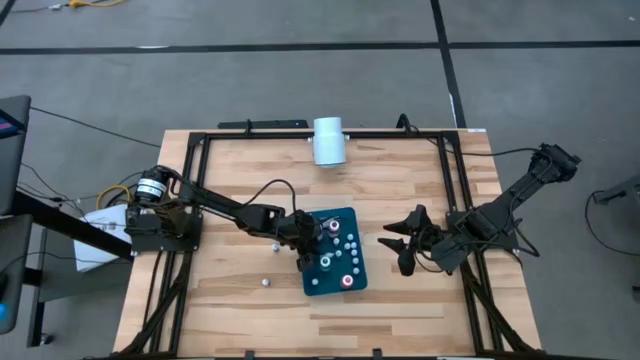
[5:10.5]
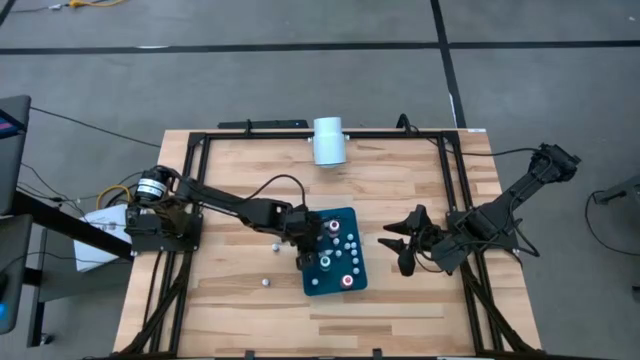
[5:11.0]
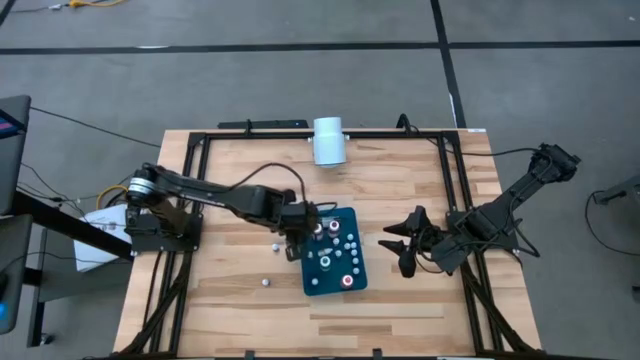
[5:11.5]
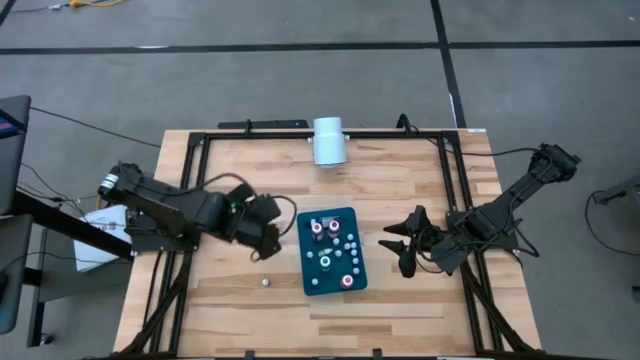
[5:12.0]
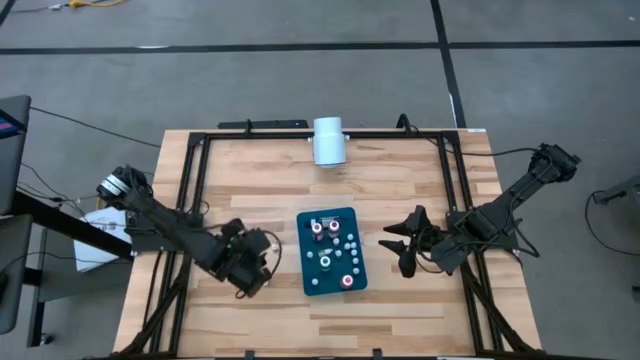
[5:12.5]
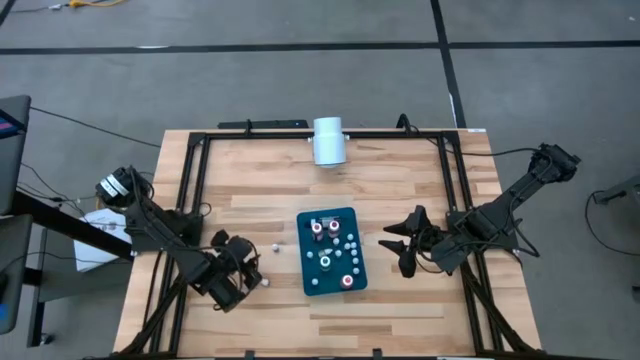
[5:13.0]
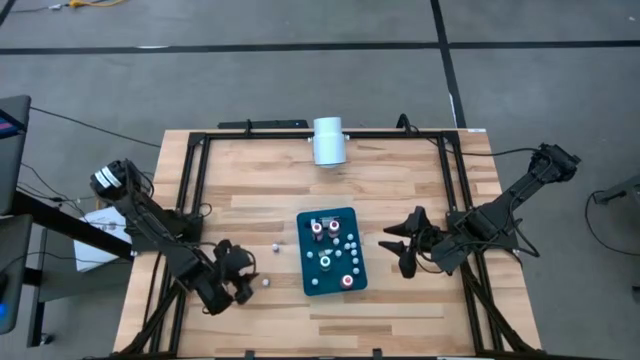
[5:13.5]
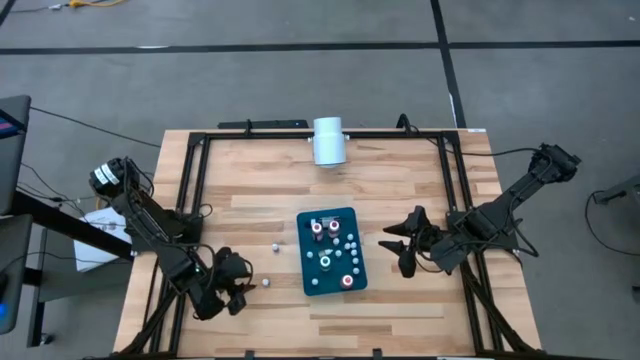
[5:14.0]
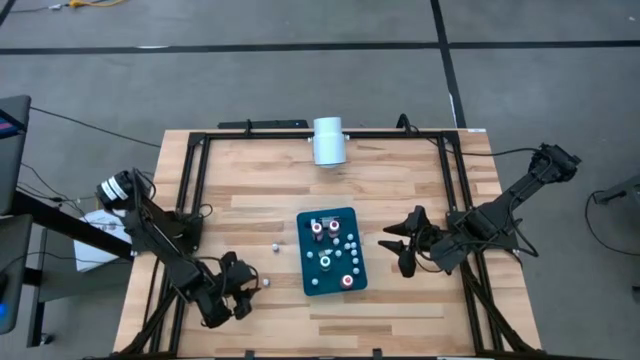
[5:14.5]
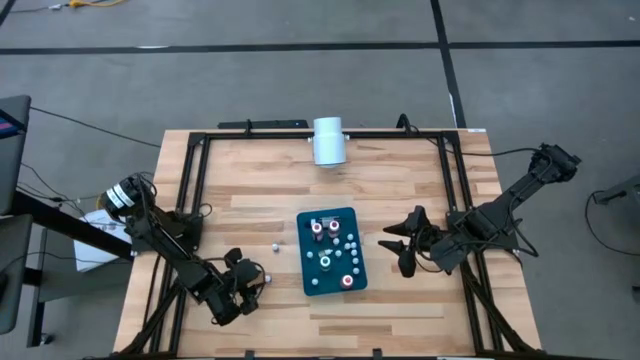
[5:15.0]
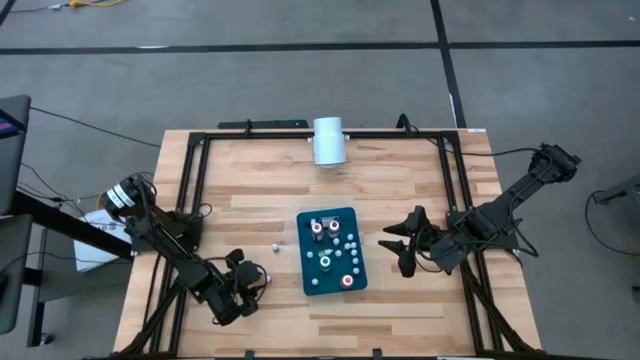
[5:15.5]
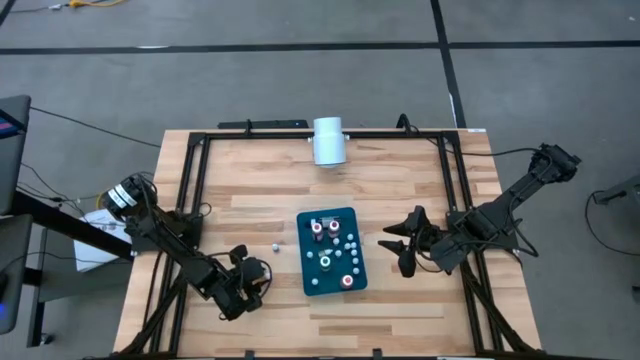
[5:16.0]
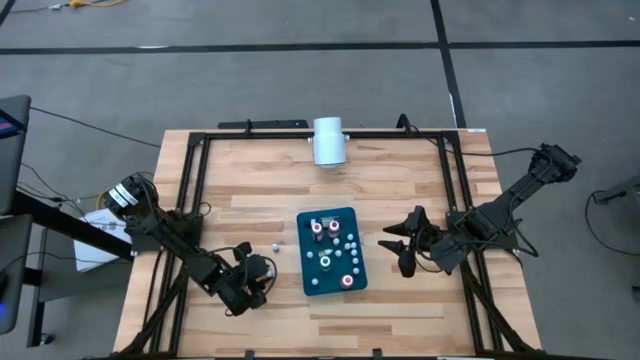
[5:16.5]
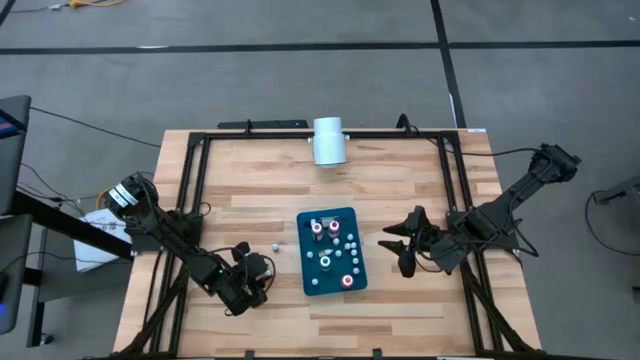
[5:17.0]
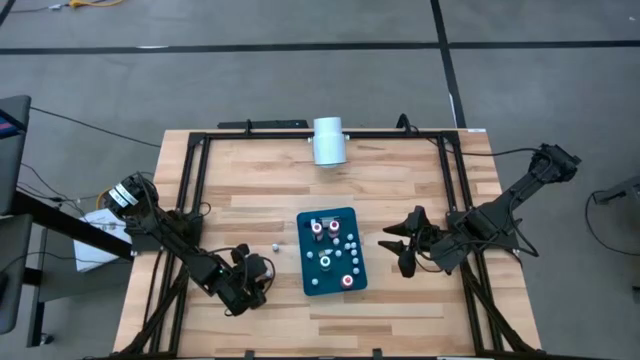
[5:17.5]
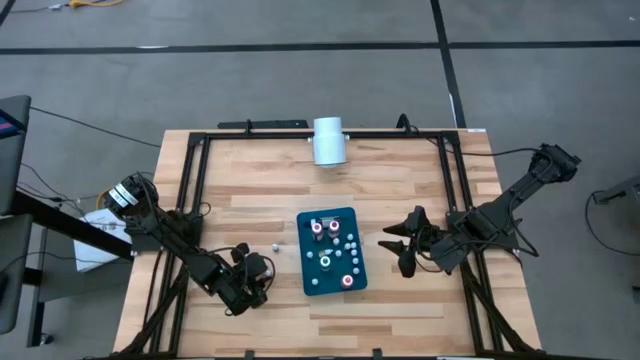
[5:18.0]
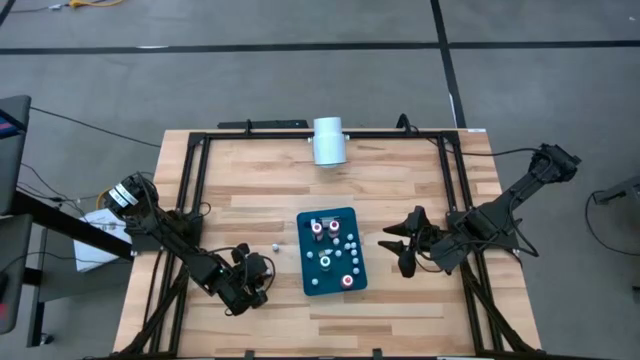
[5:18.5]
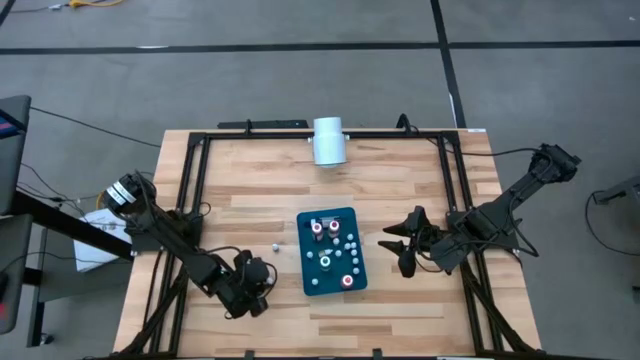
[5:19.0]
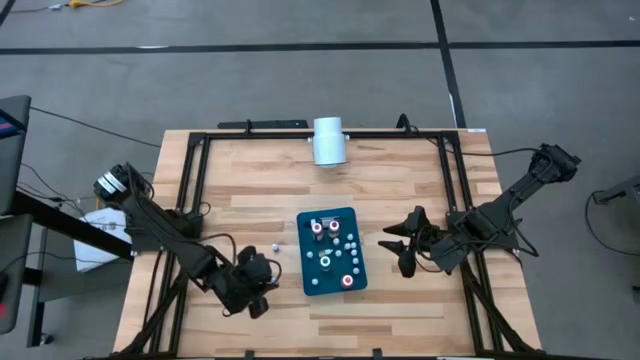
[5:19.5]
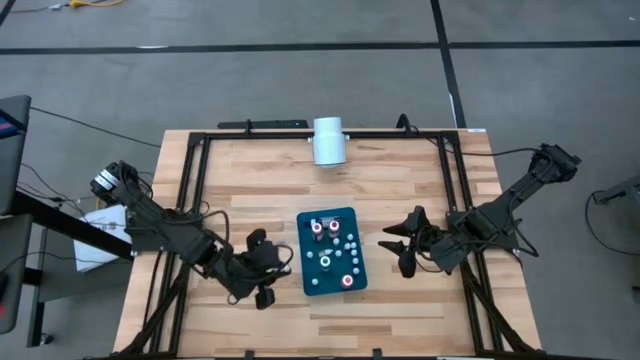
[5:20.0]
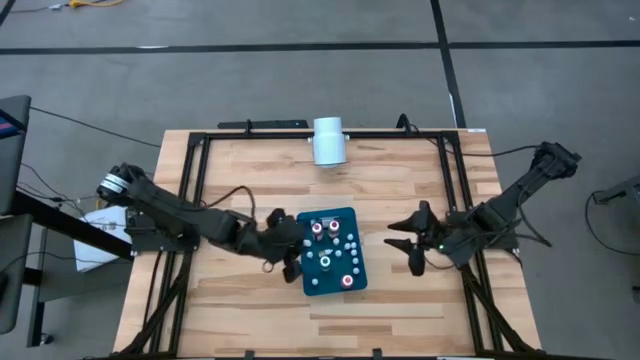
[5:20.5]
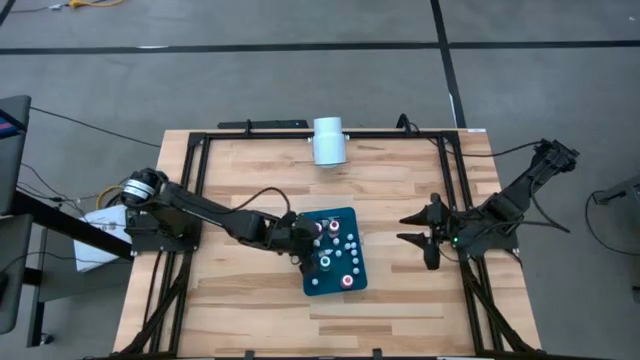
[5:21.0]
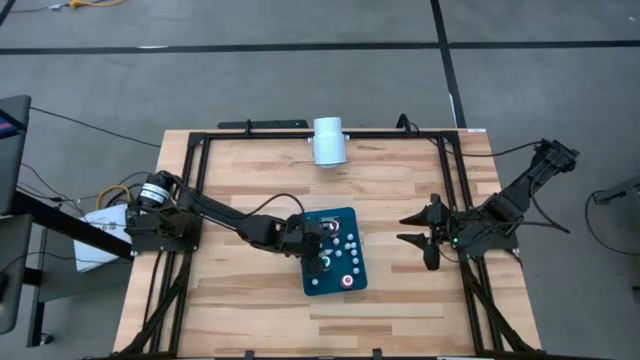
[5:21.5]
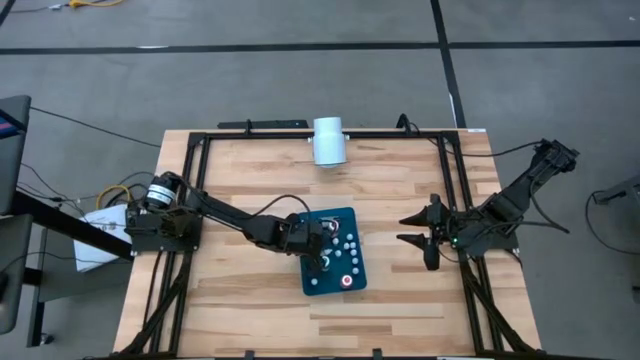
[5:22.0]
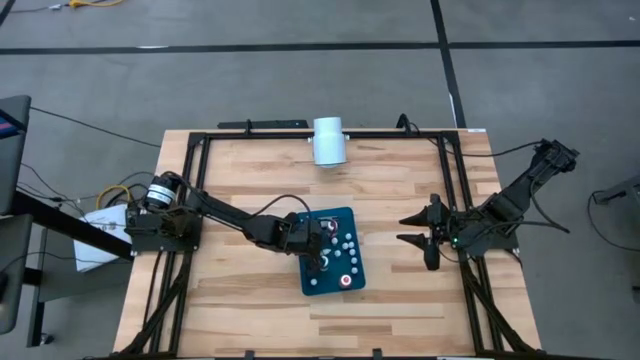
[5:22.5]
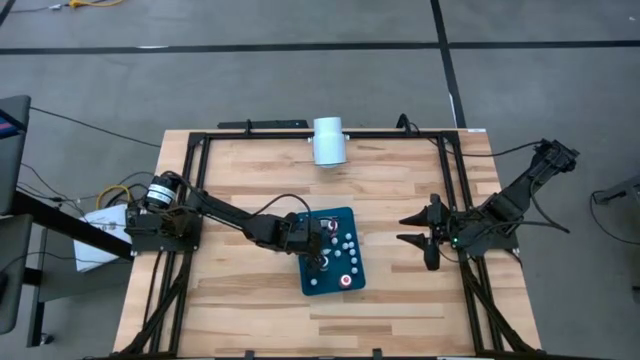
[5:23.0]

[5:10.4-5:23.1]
Task: Pick & Place food coloring
Put the small red food coloring bottle into the blue bin

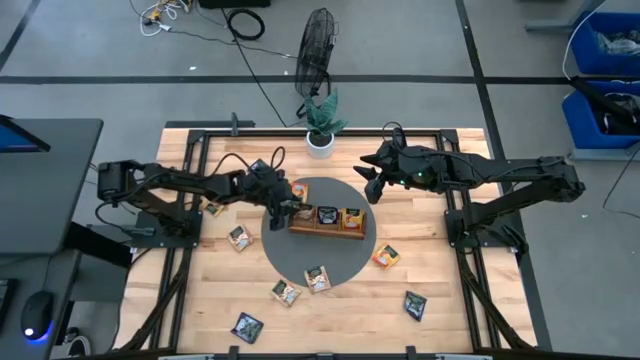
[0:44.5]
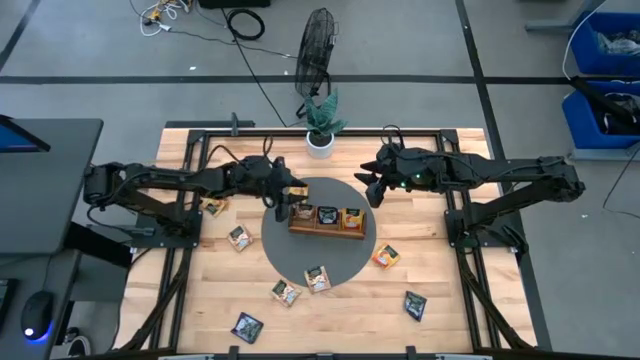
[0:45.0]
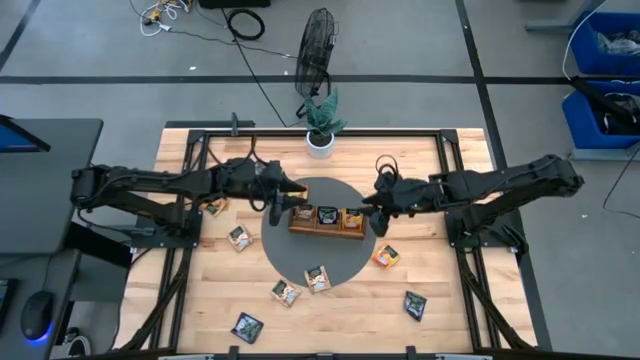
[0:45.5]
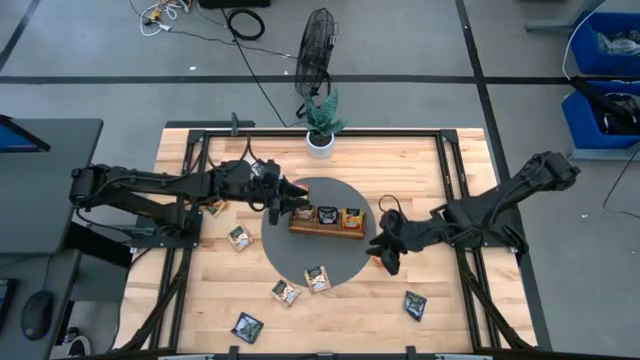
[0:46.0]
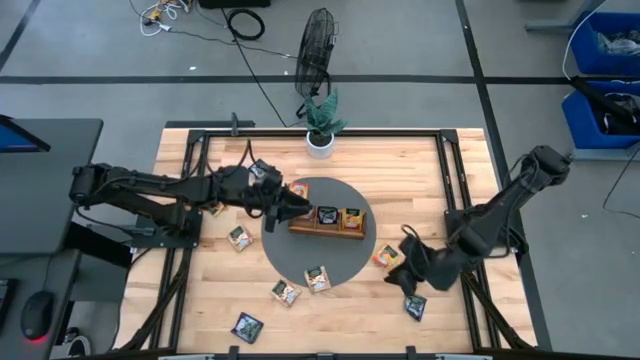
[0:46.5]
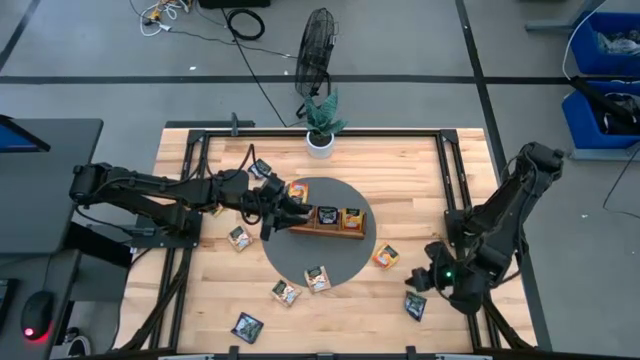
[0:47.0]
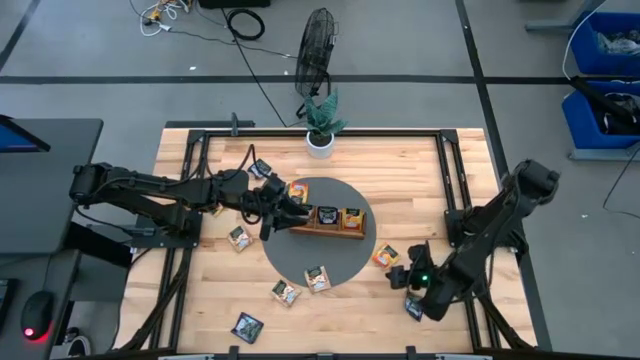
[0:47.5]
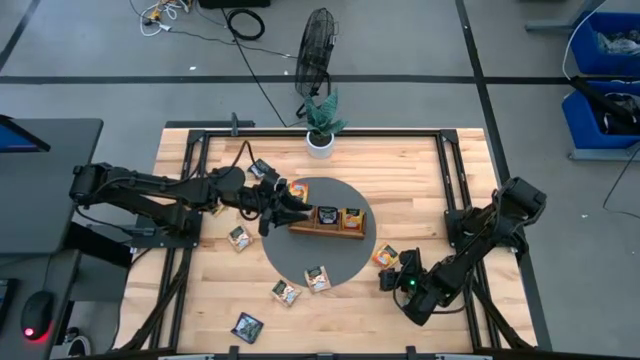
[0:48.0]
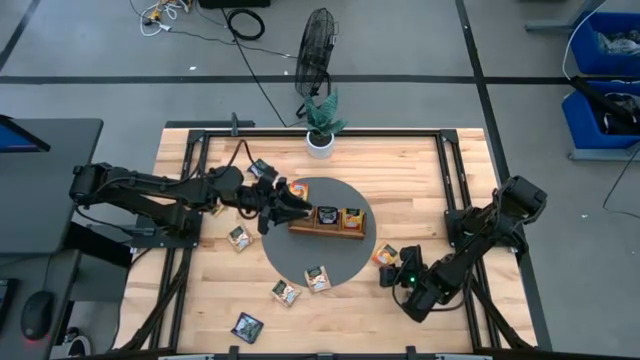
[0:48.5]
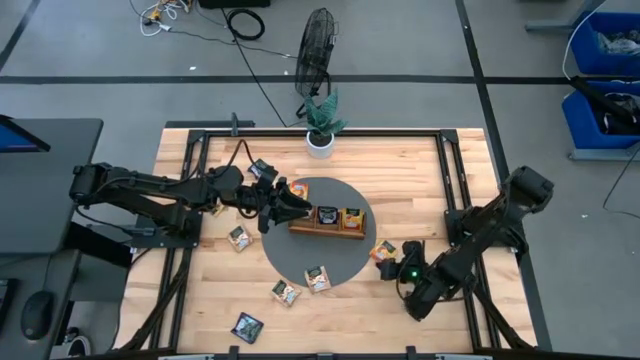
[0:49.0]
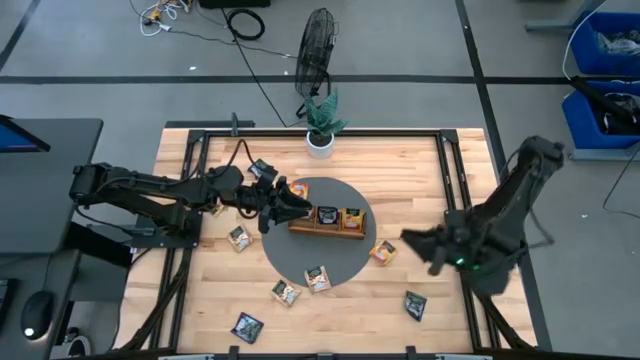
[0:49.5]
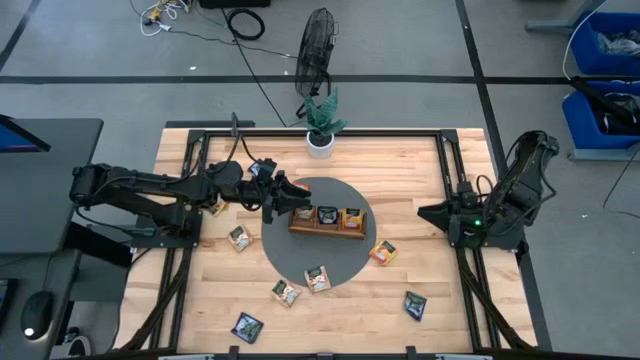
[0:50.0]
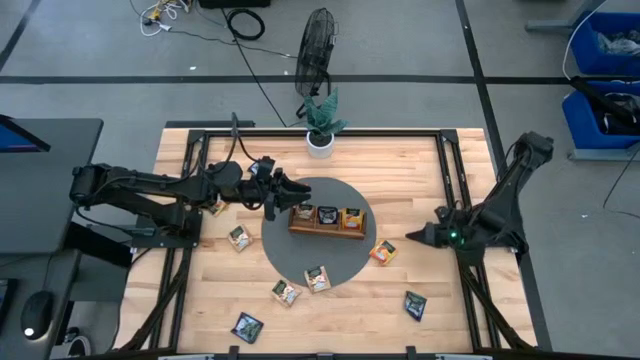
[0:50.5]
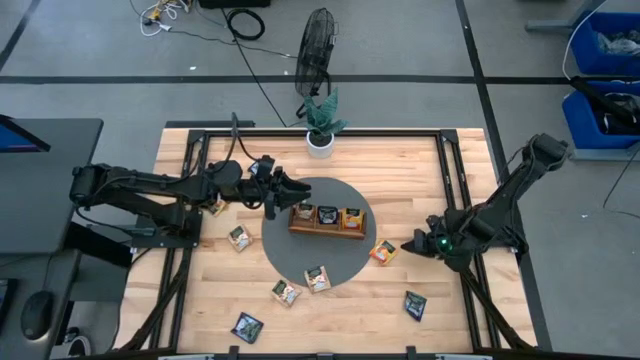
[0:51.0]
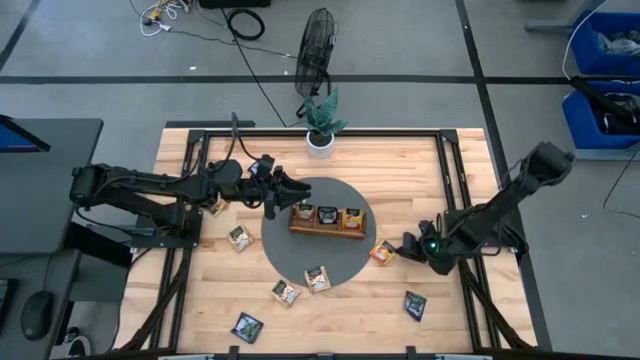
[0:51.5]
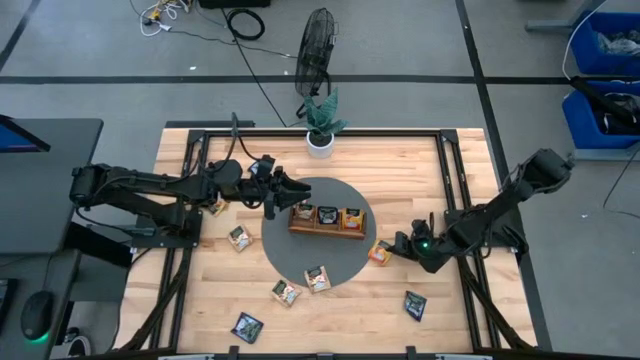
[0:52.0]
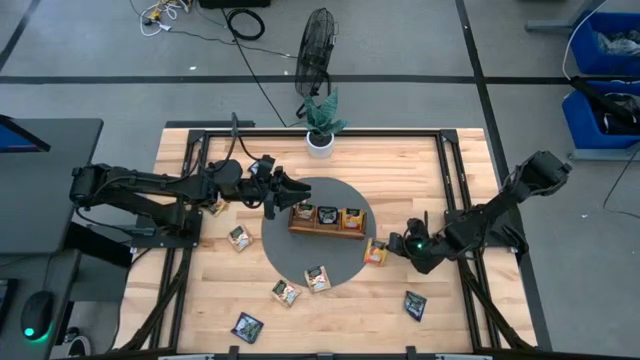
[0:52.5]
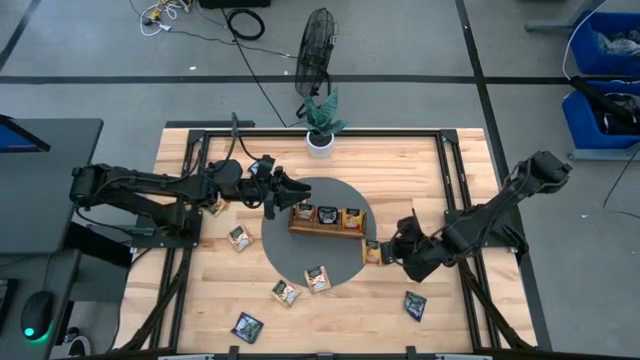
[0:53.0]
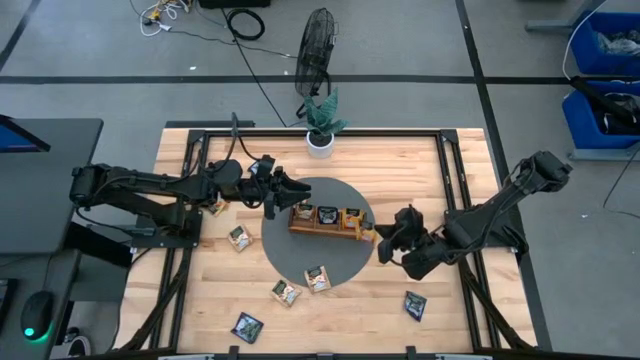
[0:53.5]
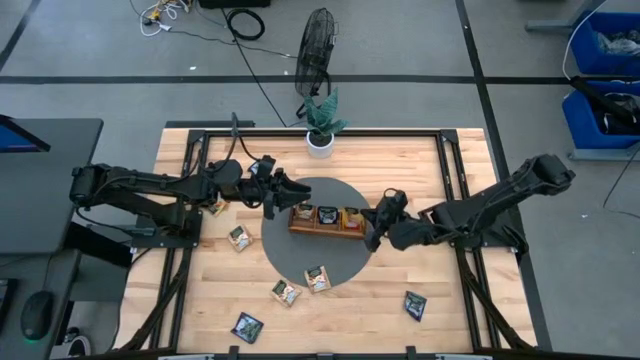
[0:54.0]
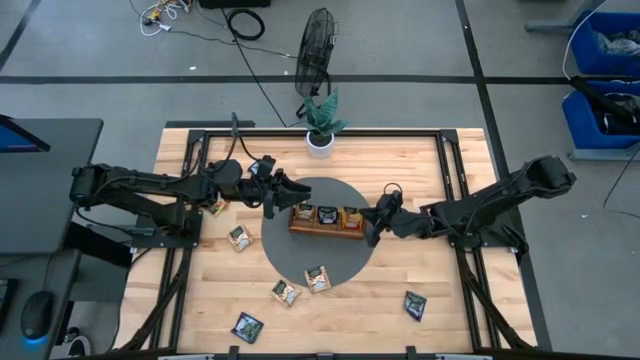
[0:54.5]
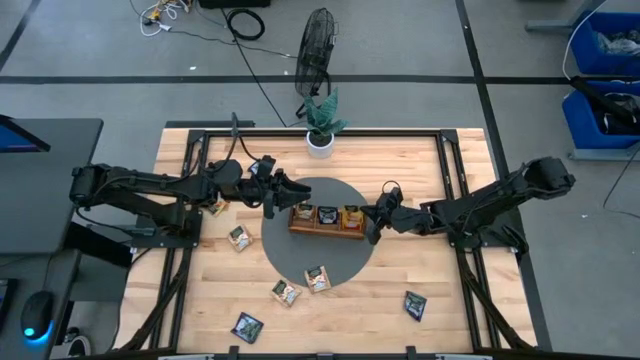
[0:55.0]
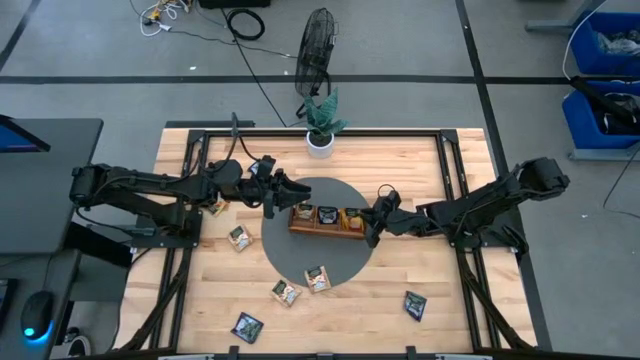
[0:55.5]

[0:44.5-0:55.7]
Task: Pick & Place Tea
Put the yellow tea bag into the right section of the wooden organizer
